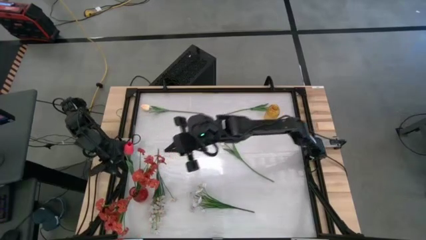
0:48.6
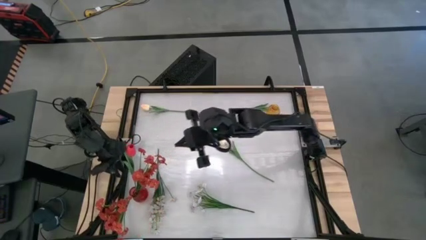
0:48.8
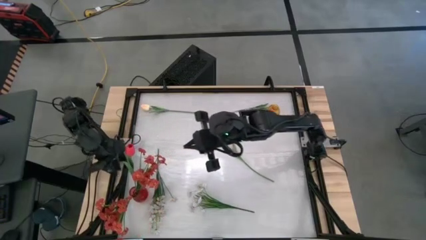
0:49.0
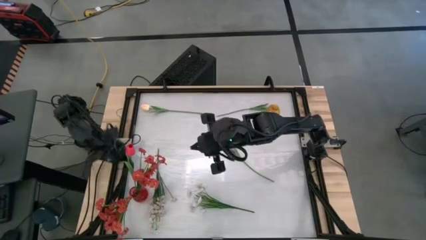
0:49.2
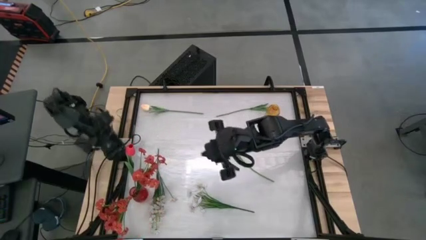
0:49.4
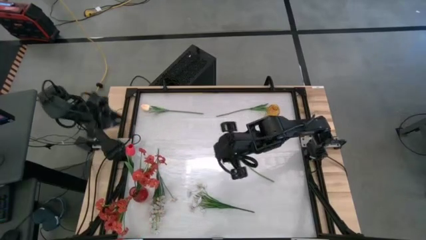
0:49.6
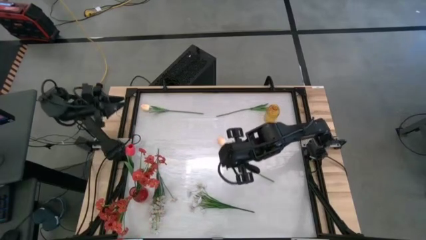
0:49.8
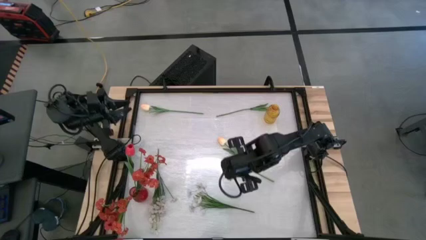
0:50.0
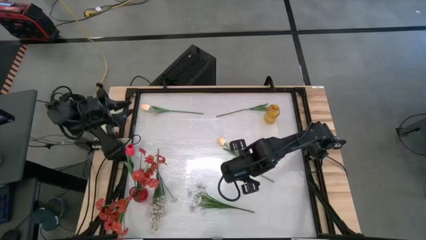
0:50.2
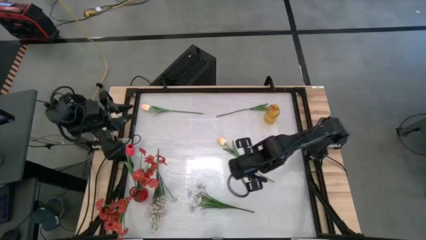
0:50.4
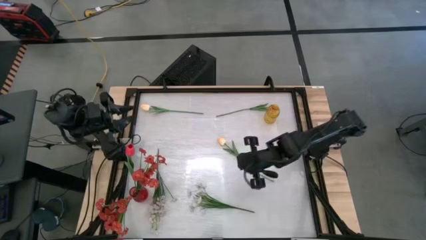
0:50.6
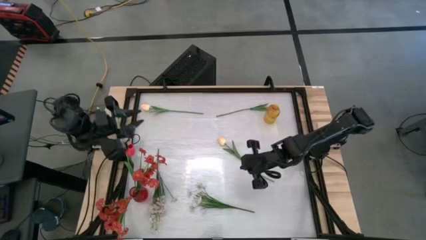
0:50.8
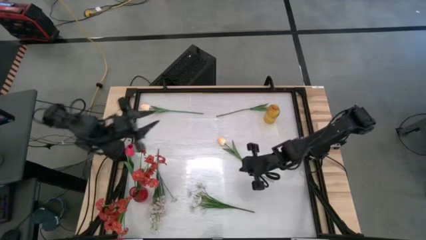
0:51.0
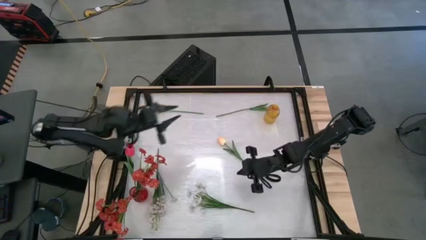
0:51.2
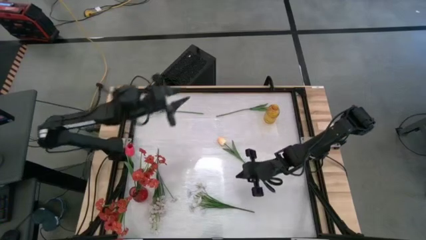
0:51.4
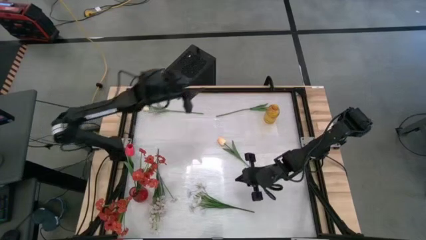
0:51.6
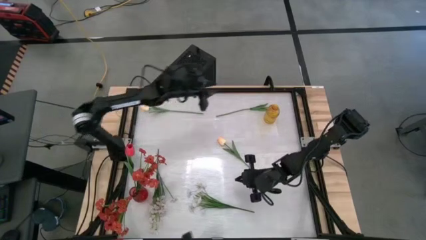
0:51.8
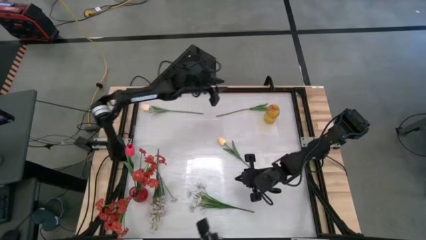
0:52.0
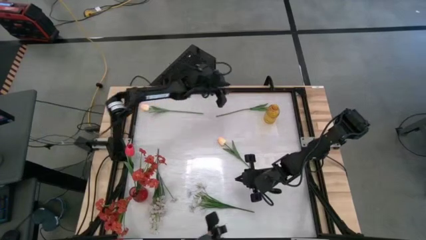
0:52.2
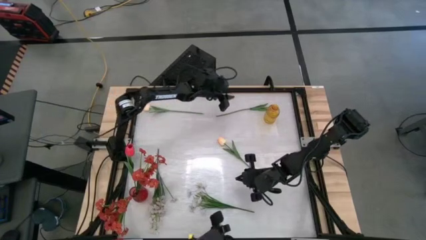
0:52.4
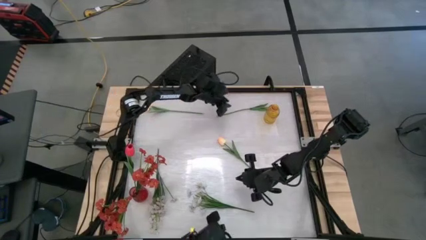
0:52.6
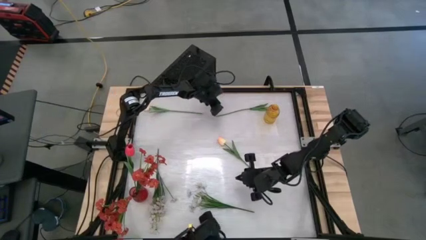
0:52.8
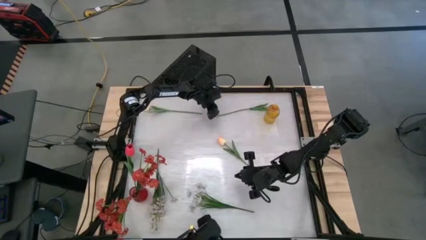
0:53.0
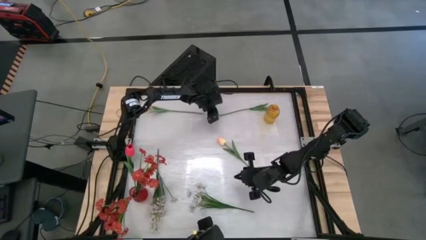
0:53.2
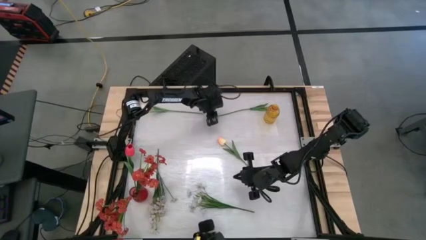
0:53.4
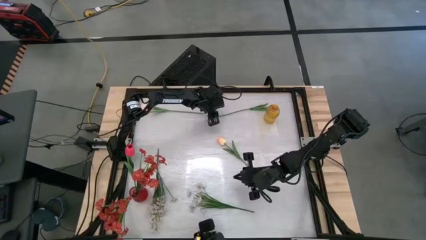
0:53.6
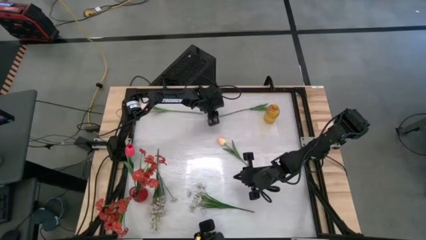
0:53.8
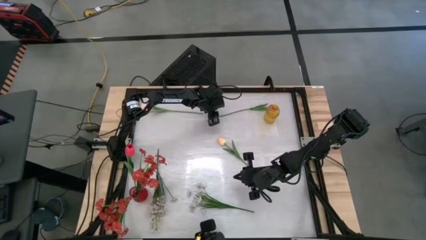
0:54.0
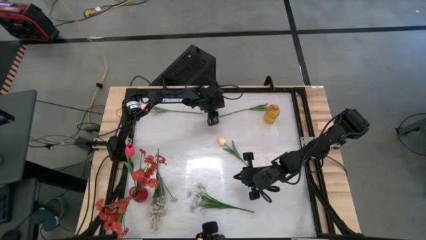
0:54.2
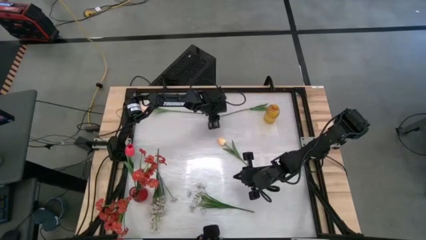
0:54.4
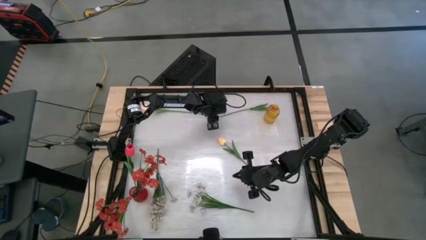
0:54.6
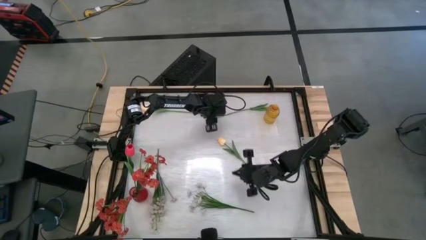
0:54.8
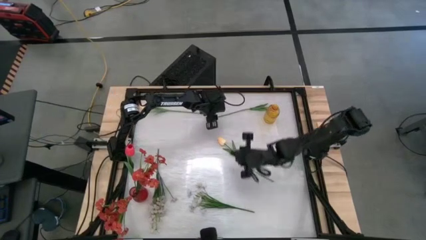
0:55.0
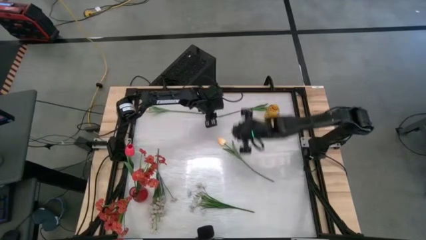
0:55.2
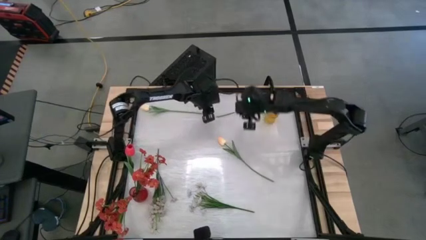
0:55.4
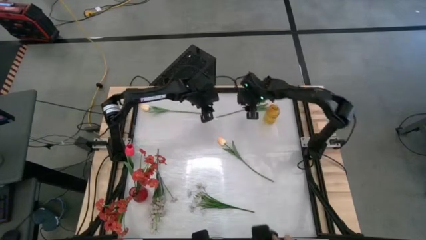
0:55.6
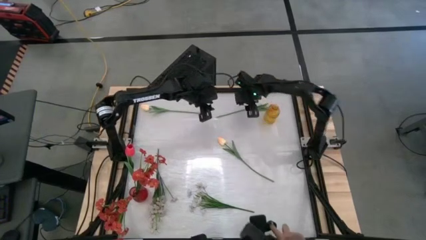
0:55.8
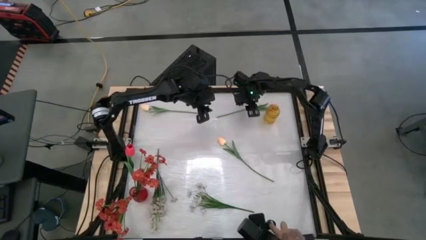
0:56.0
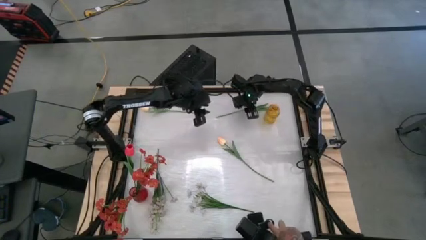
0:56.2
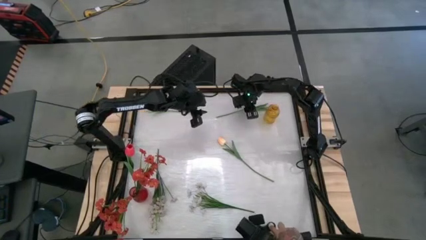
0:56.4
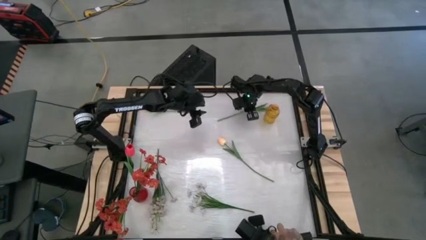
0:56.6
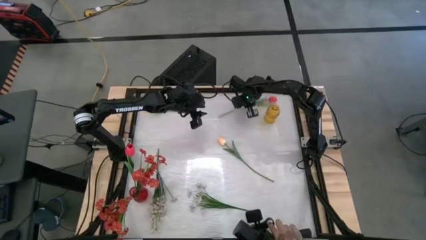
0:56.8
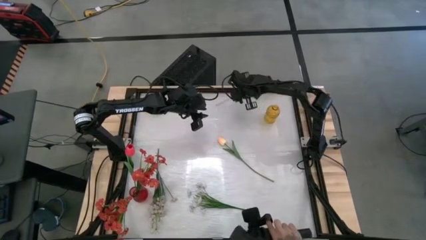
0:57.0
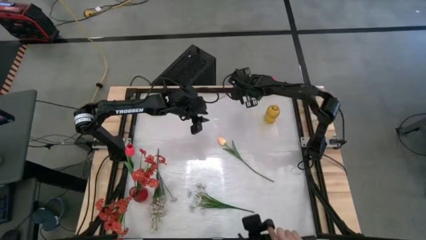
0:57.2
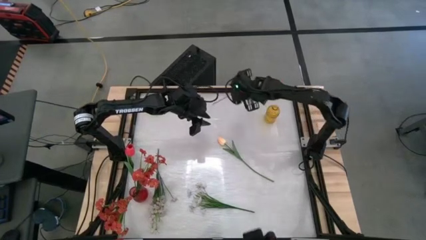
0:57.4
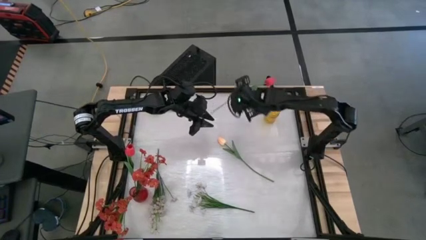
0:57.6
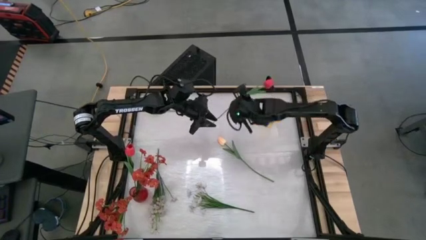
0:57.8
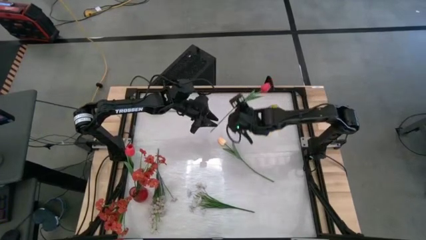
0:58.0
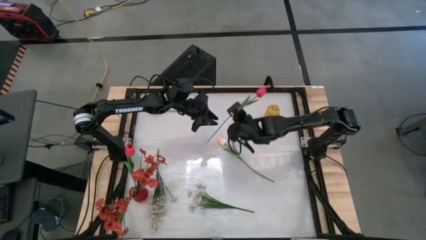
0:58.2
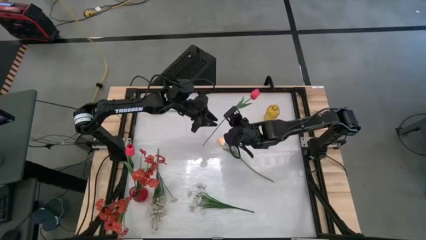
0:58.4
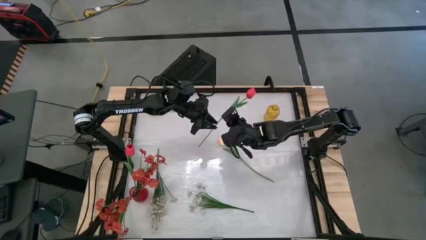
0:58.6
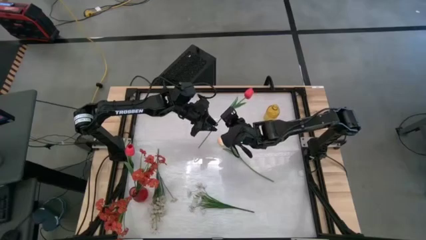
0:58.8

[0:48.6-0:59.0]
Task: Sort flowers into vase by color
Put the red tulip into the red vase
